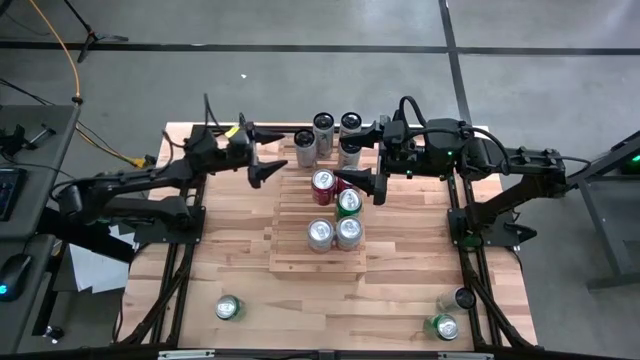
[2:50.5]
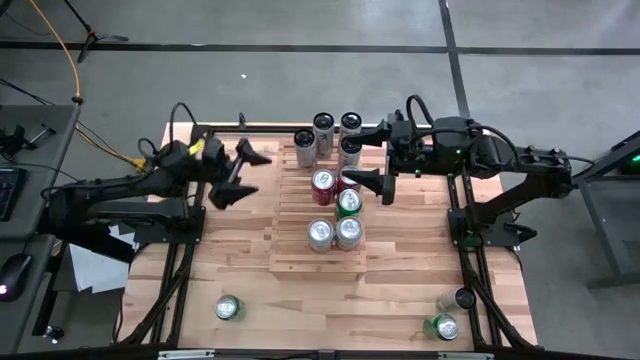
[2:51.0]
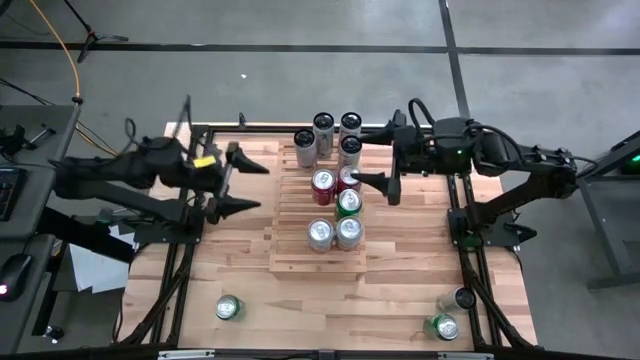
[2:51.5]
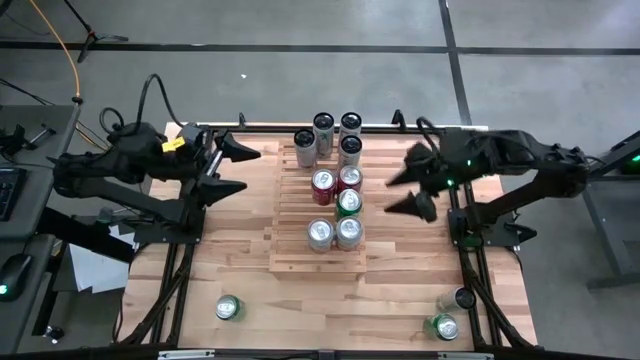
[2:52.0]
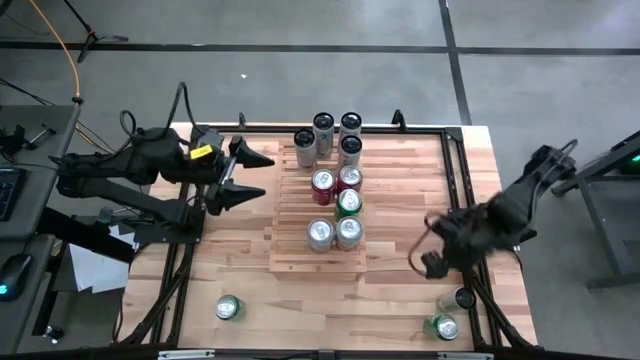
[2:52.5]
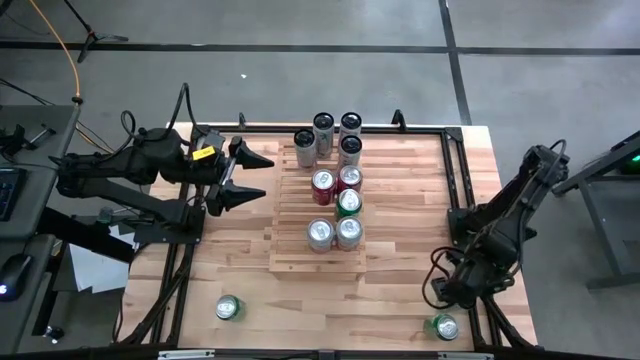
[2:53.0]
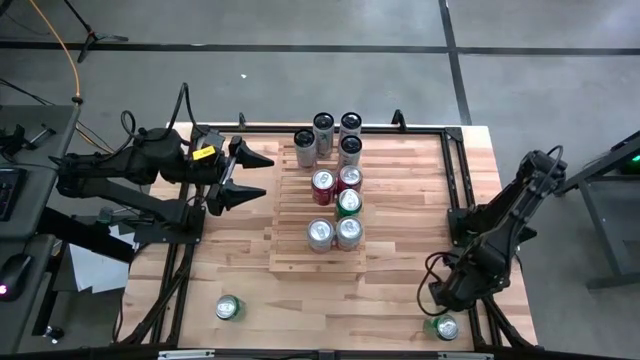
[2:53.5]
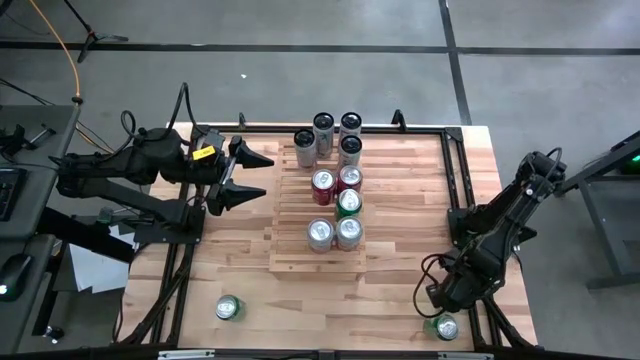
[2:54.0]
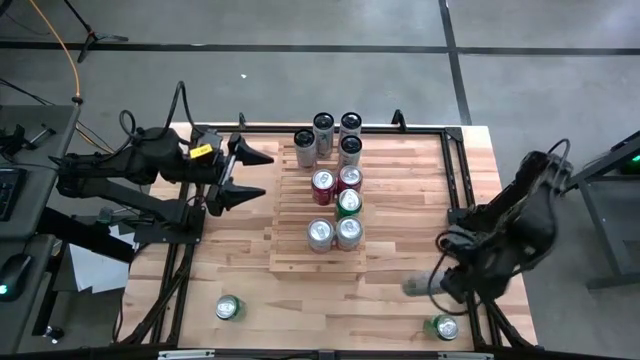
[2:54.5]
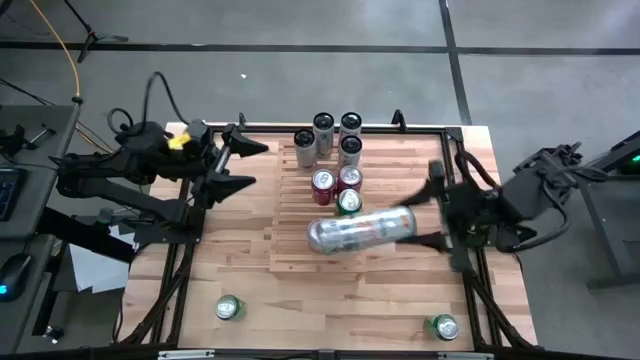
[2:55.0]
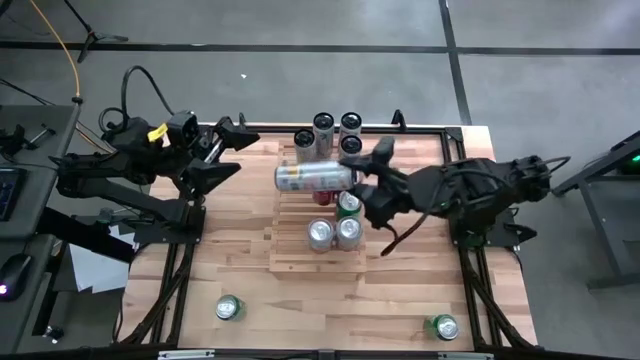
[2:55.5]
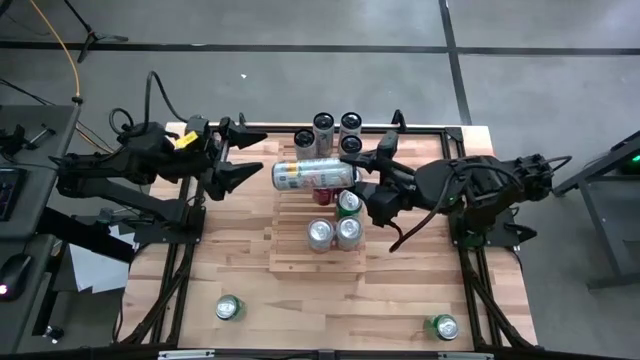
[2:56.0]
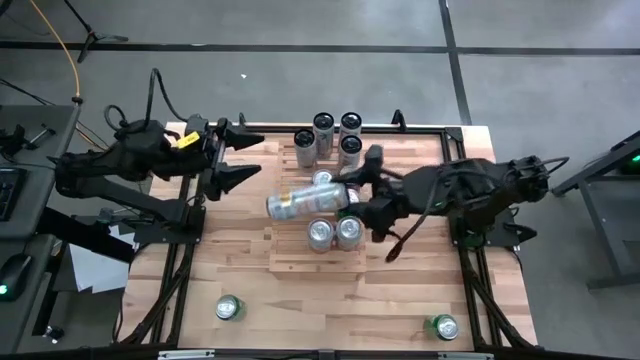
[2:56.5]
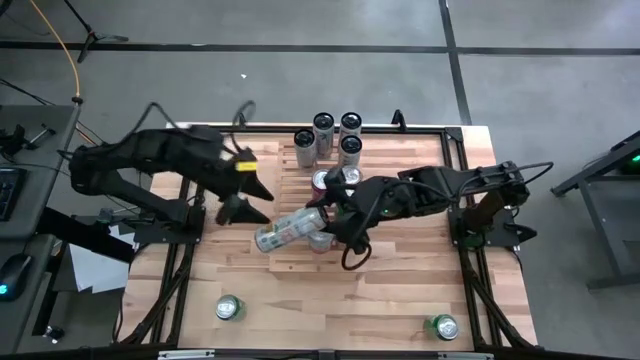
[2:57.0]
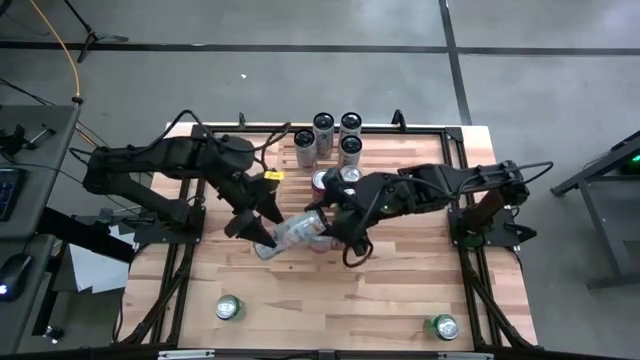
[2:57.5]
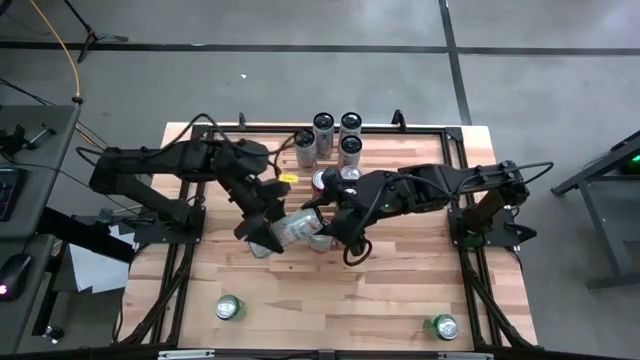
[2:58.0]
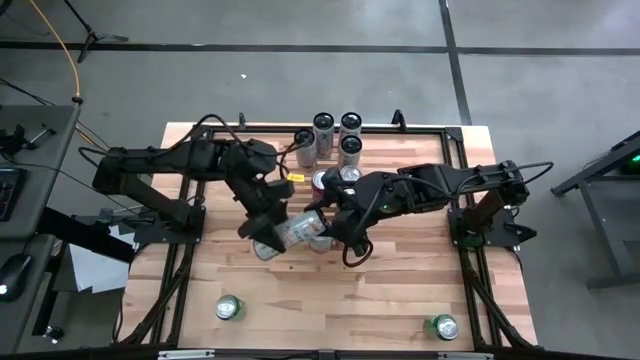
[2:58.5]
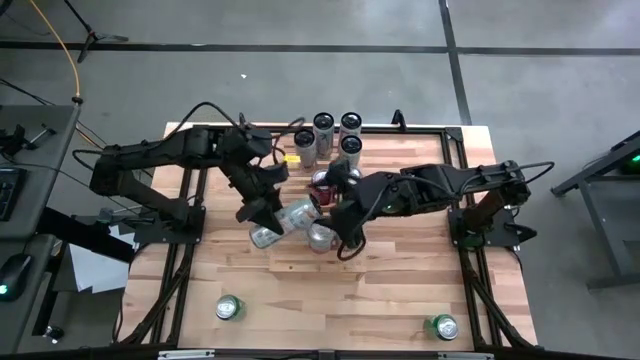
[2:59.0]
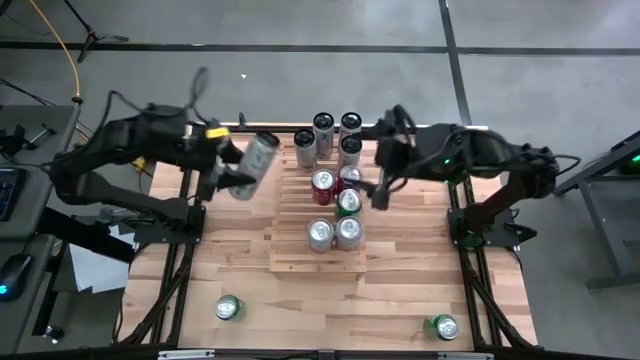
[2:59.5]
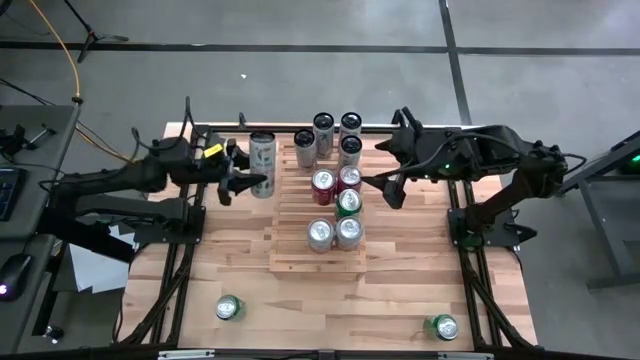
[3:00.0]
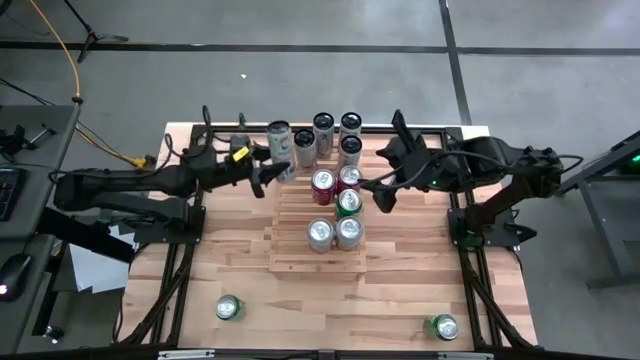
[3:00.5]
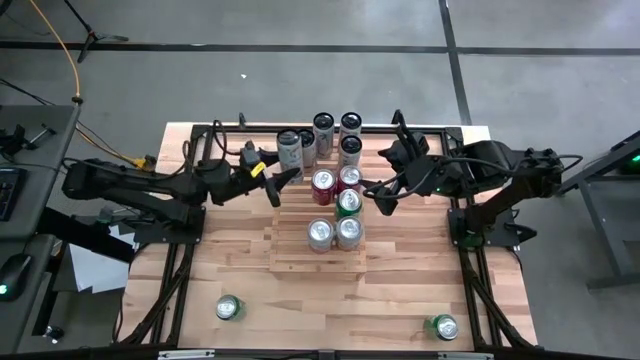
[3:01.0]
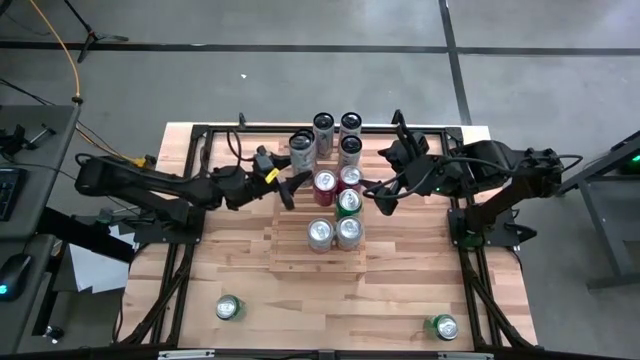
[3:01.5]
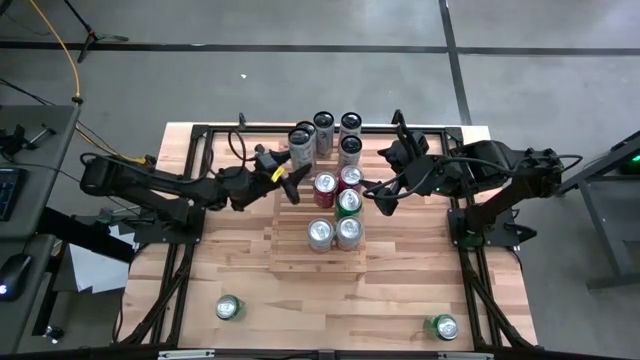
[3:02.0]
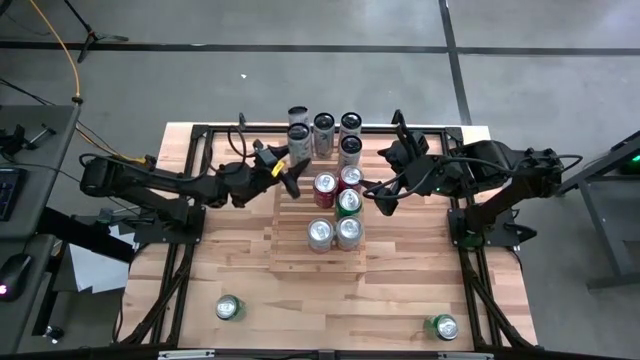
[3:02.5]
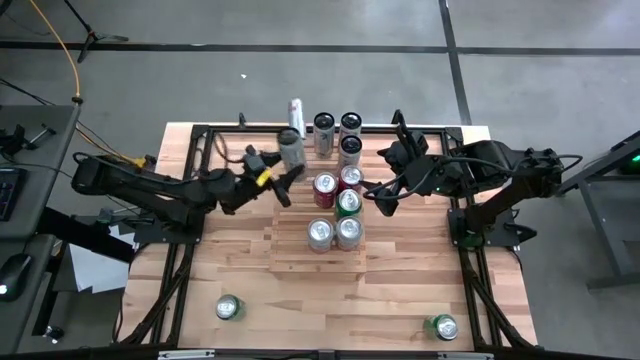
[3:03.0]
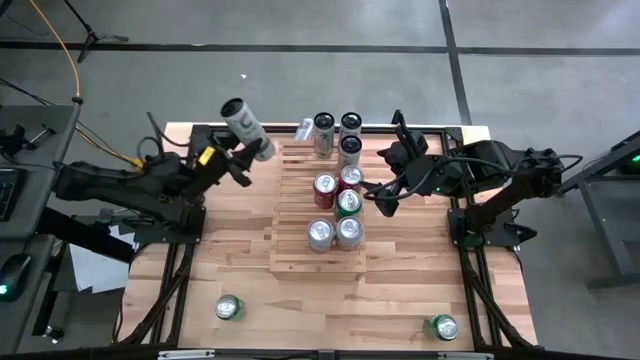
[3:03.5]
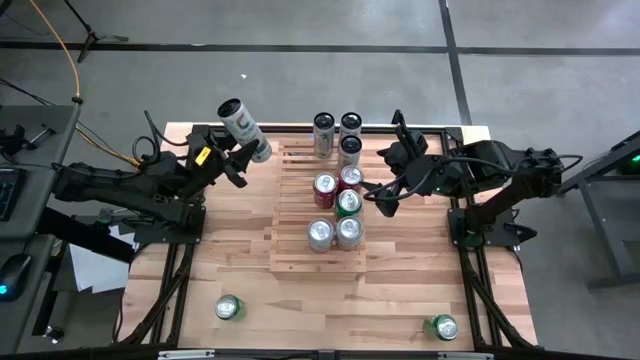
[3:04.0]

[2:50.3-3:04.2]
Task: Place canned beverage on shelf
Put the white pink can on the shelf

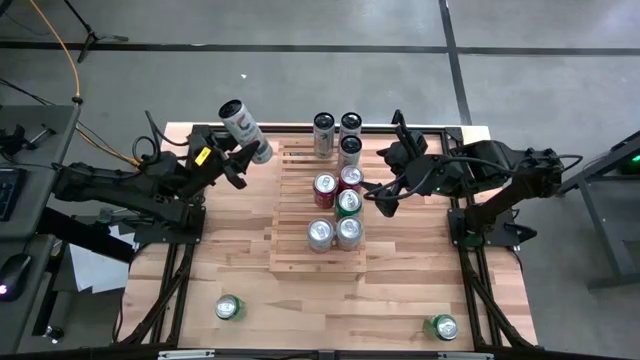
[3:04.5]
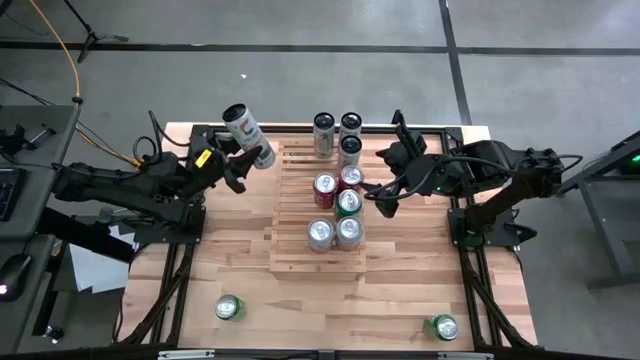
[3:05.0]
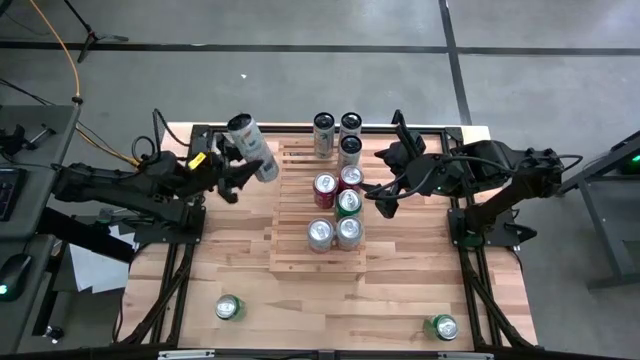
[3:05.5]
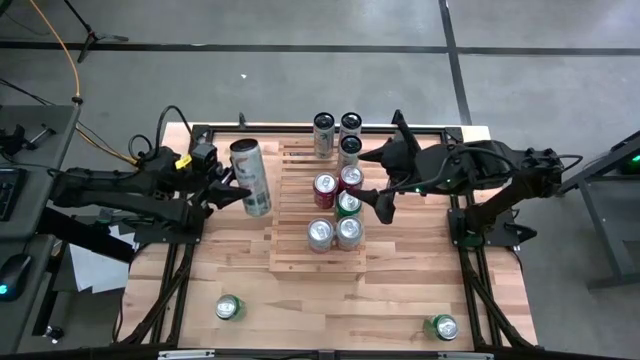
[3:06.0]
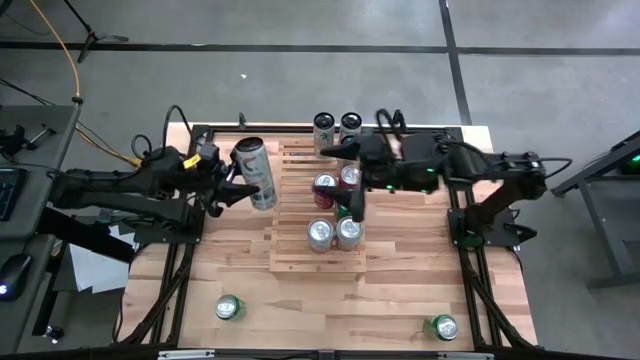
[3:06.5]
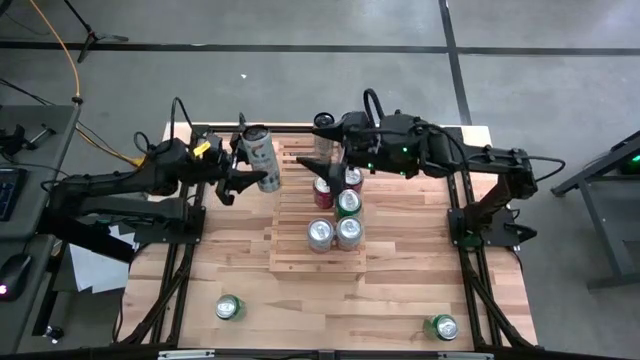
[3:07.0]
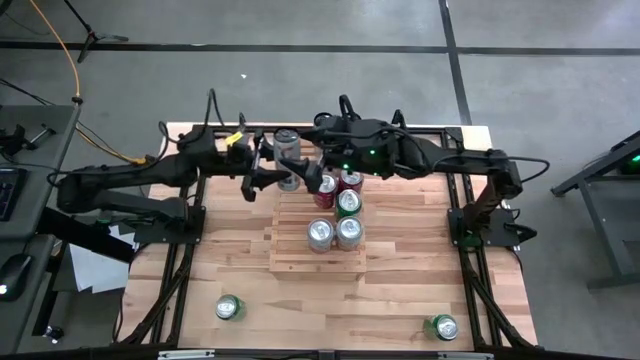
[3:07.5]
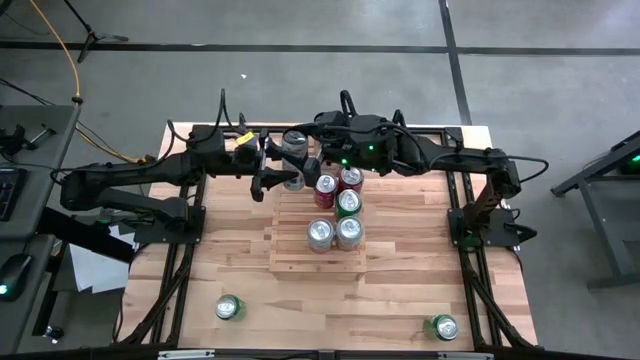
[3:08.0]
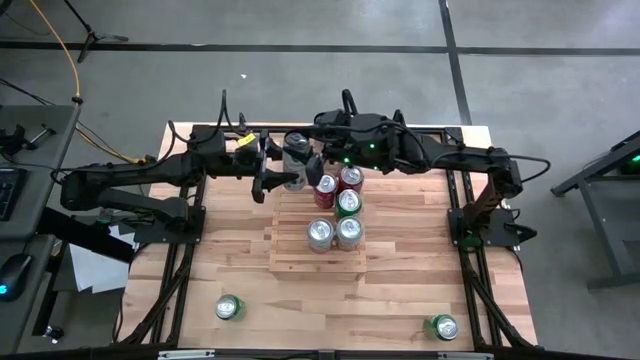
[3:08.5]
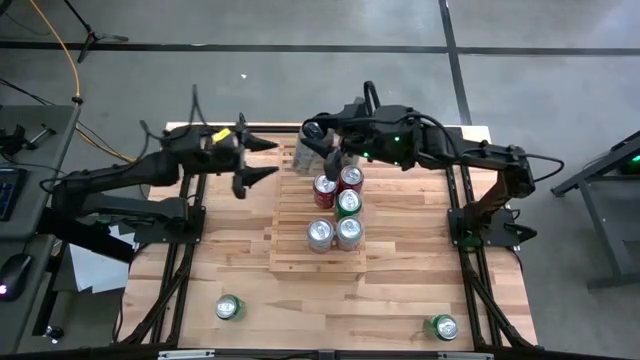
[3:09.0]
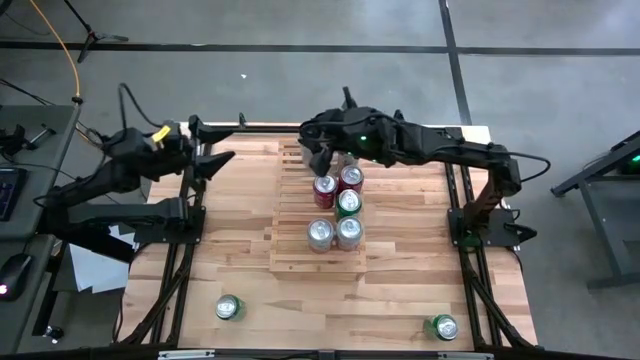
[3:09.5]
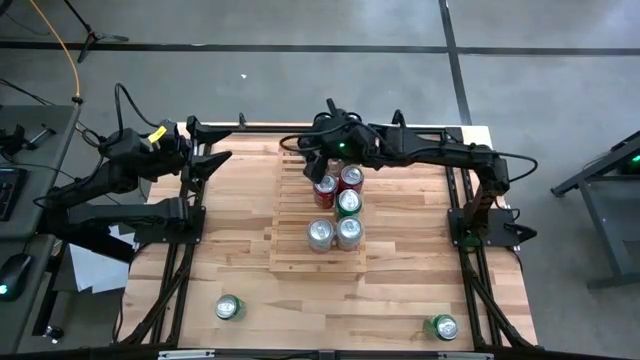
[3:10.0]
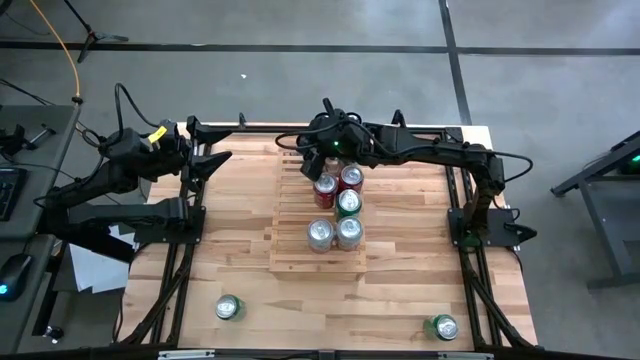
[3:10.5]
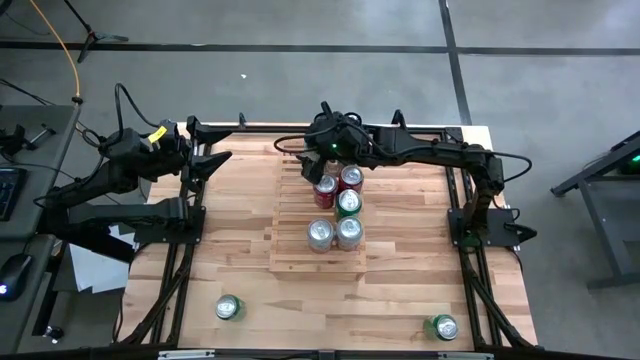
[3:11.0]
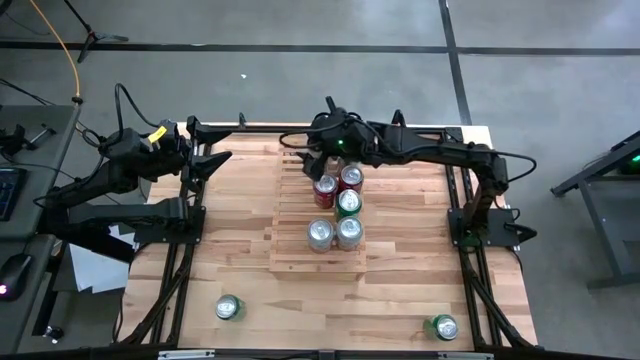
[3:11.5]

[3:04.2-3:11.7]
Put the white pink can on the shelf
